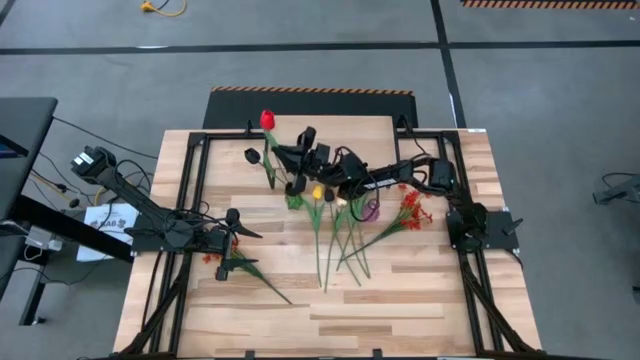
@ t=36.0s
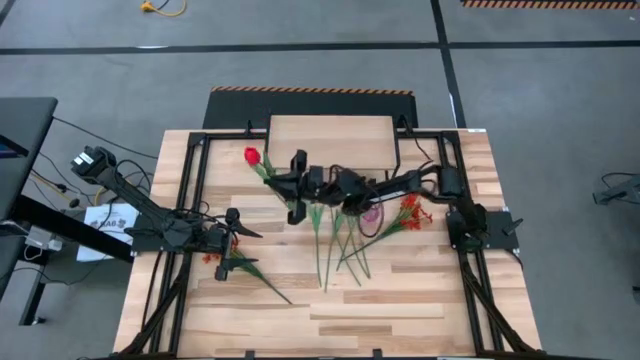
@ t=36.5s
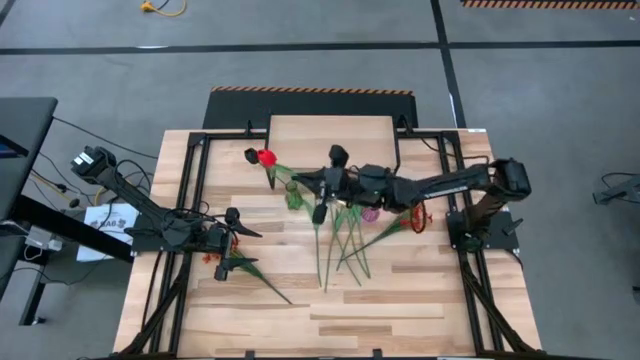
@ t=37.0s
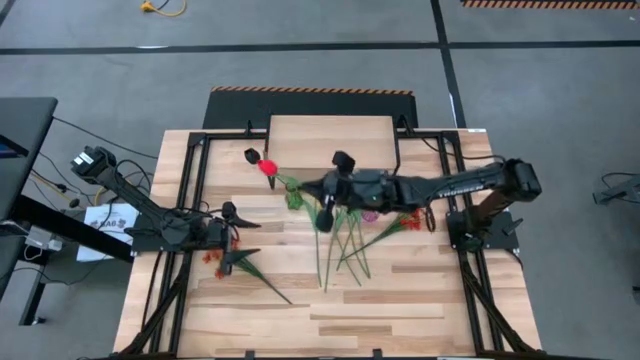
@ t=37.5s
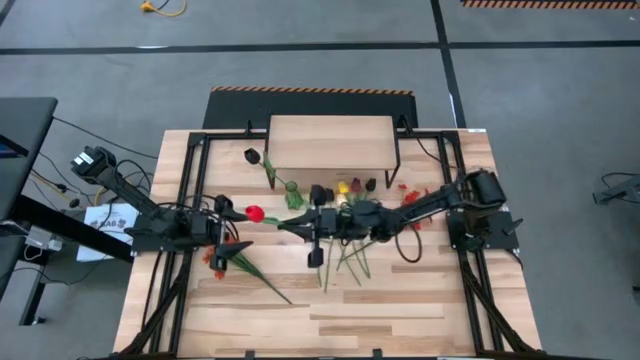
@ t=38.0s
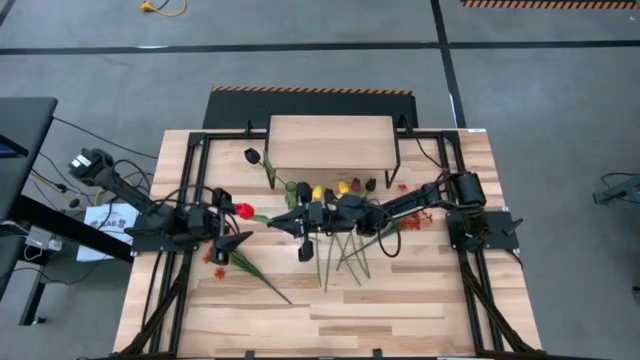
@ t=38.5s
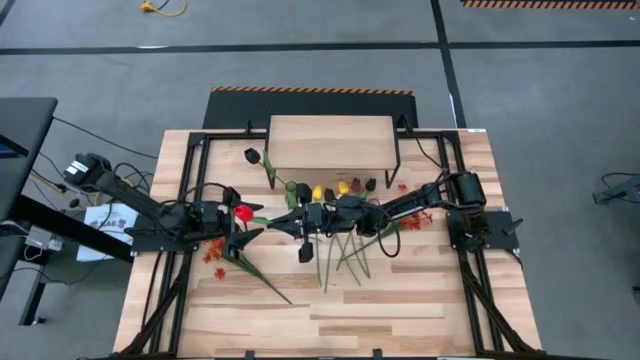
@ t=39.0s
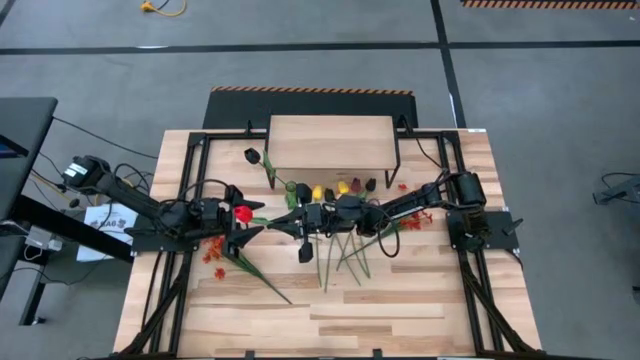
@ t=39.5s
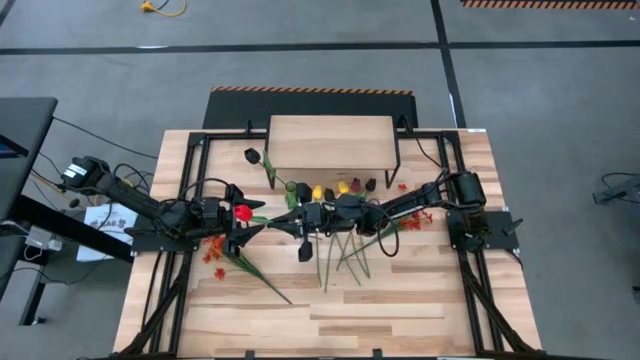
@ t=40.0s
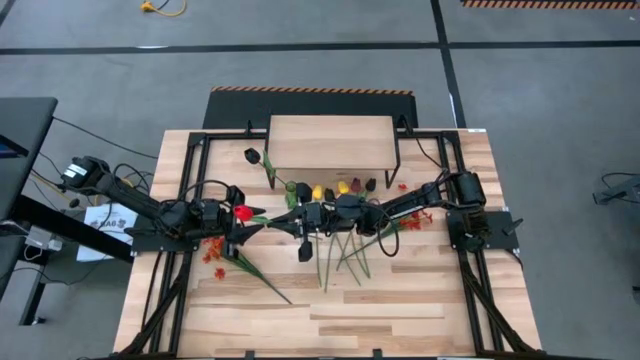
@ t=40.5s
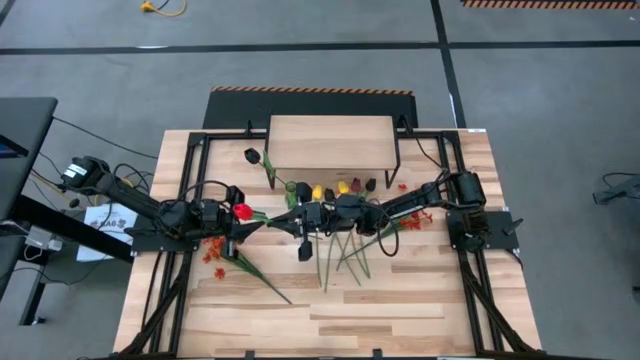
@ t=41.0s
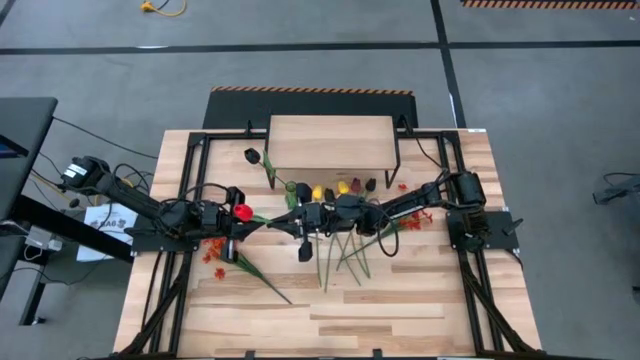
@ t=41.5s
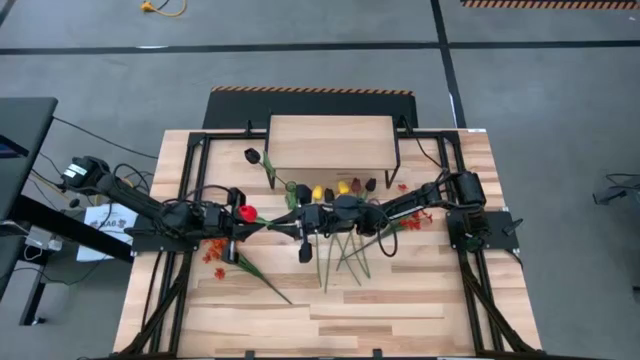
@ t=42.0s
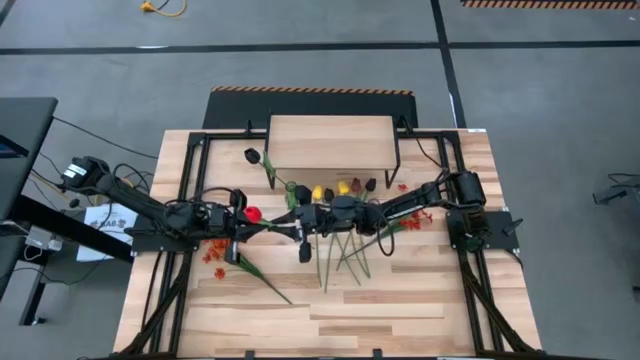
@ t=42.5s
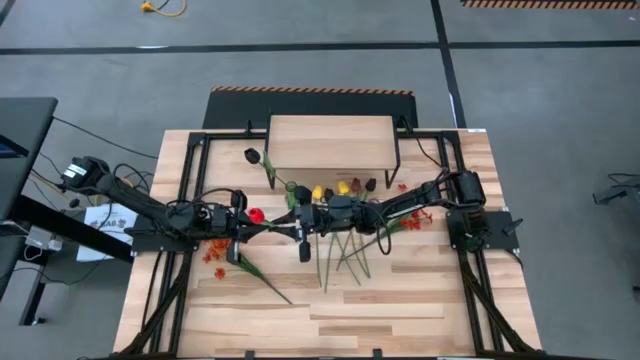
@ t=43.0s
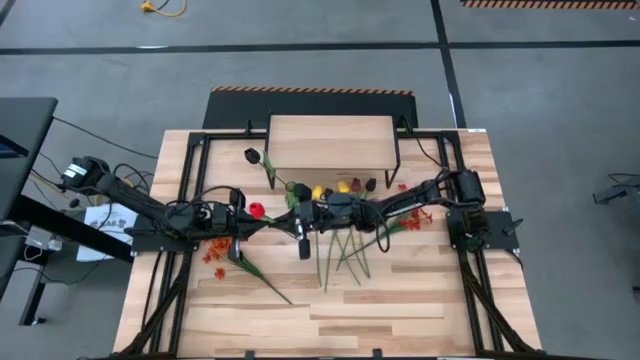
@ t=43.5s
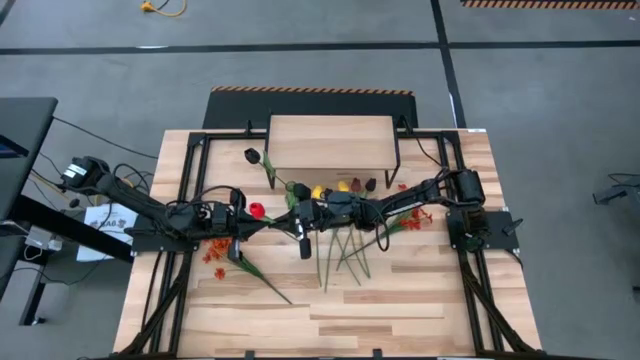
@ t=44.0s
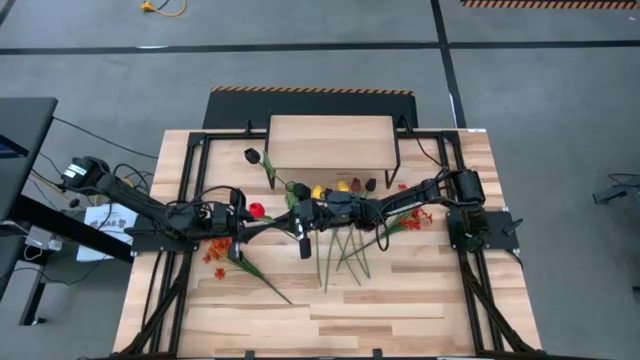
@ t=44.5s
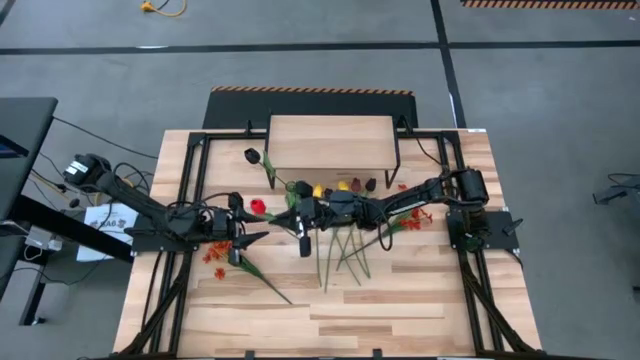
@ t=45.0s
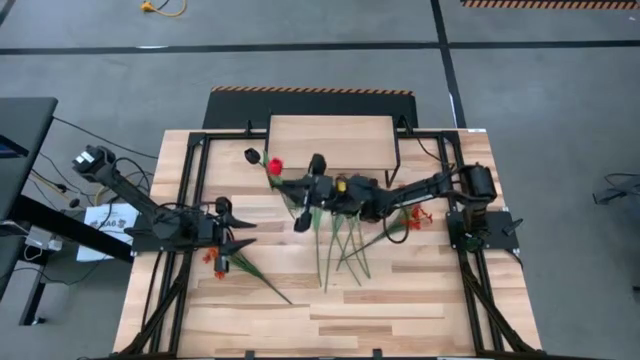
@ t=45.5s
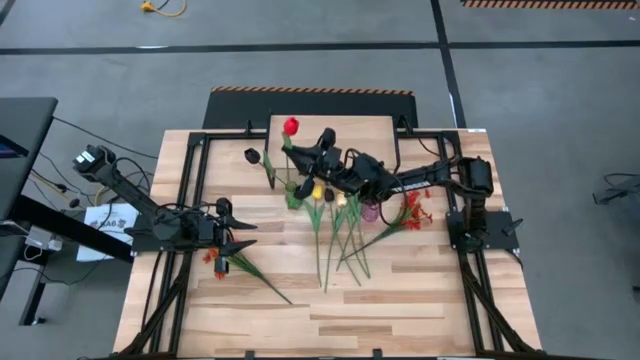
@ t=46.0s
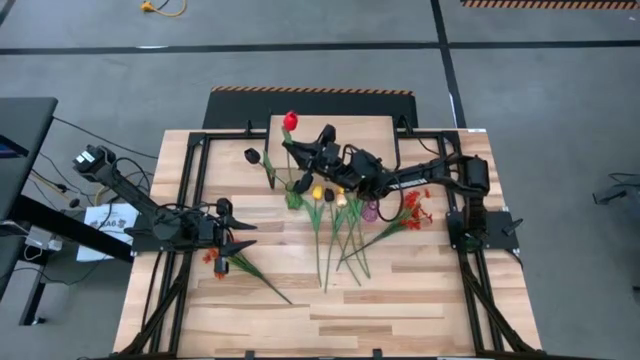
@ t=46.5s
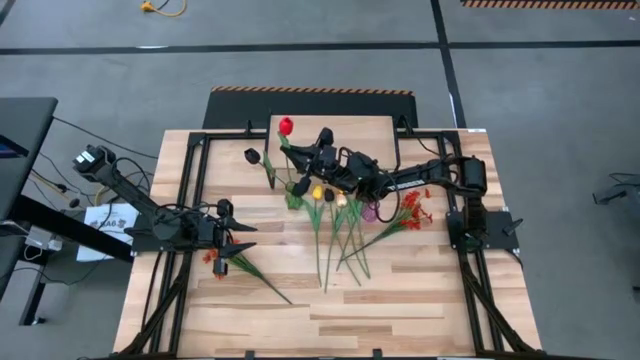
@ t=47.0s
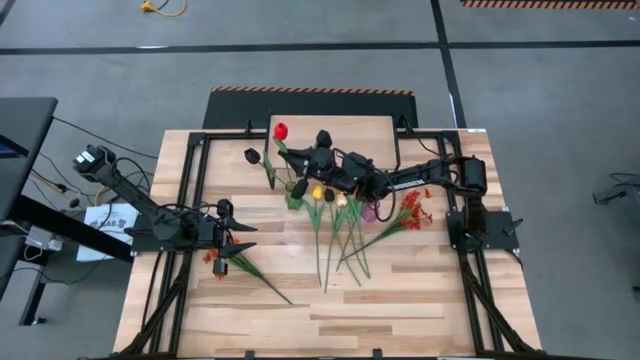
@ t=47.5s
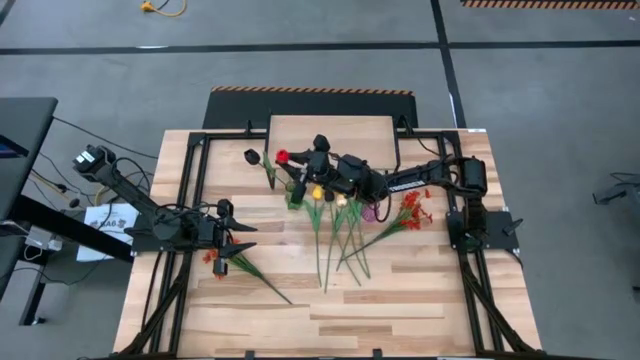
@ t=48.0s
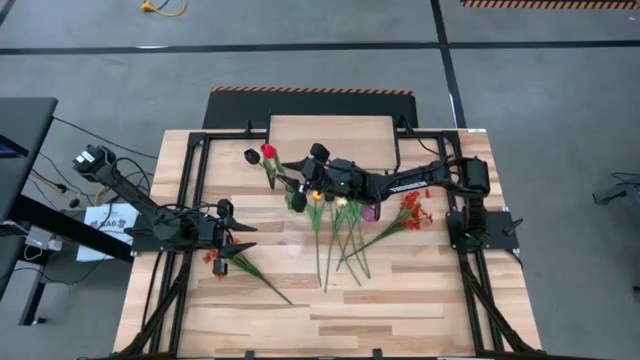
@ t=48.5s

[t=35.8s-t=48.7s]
Task: Pick and place flowers into a vace then onto a shelf
Put the red tulip into the green vase

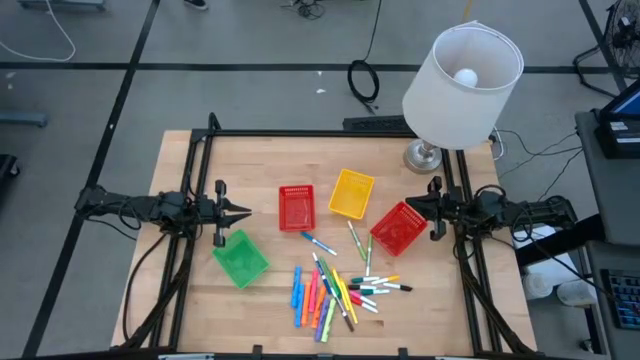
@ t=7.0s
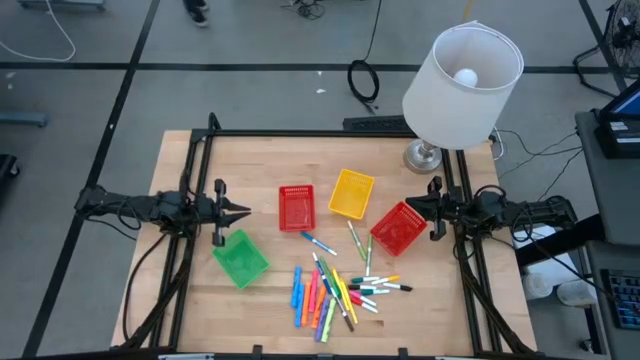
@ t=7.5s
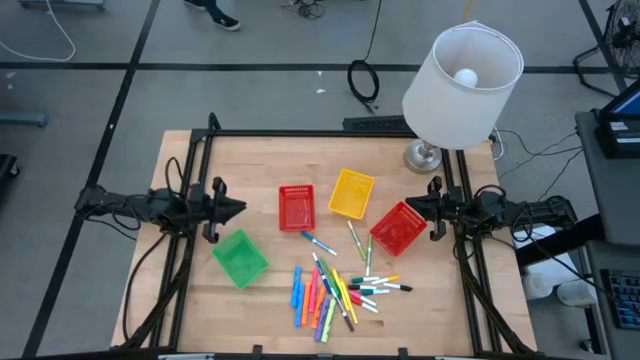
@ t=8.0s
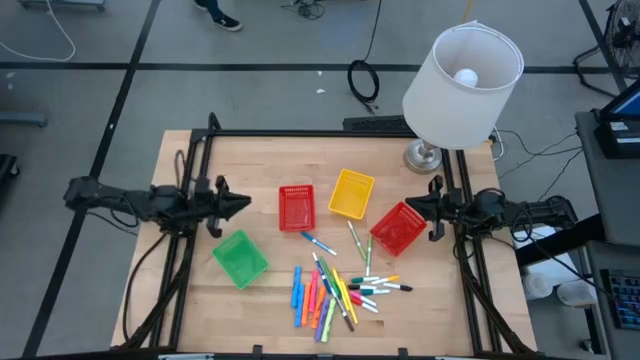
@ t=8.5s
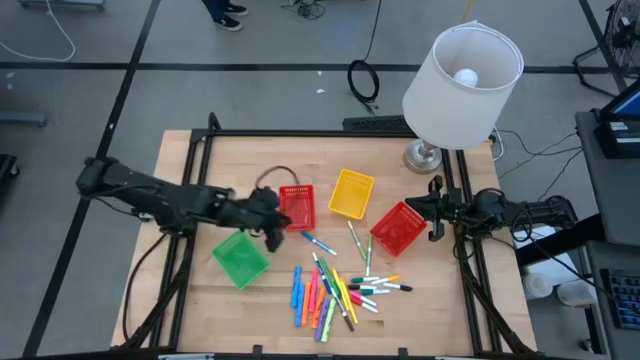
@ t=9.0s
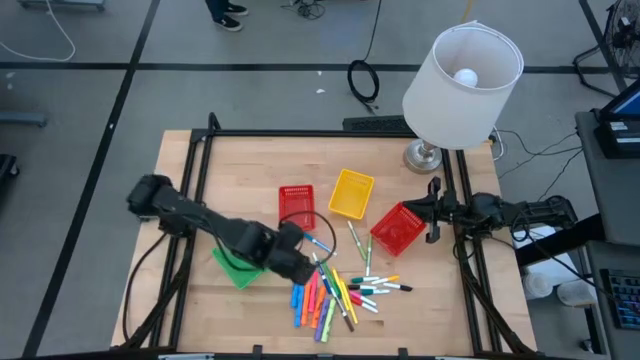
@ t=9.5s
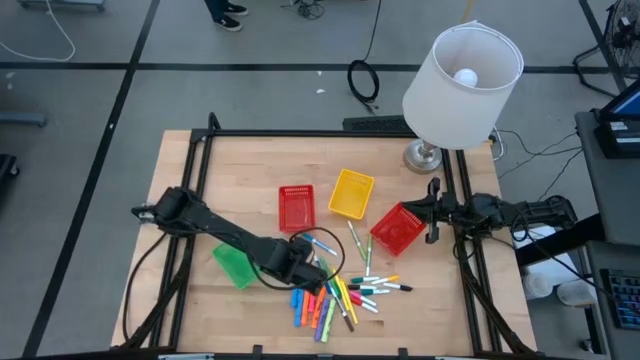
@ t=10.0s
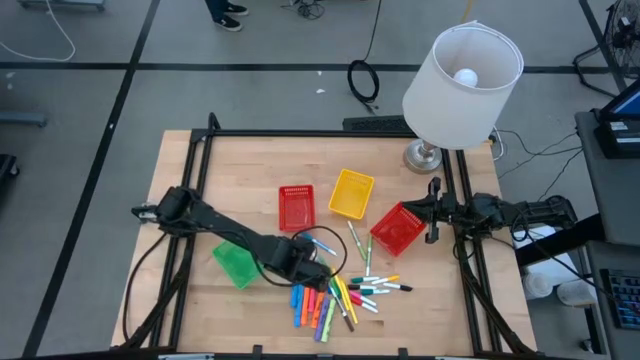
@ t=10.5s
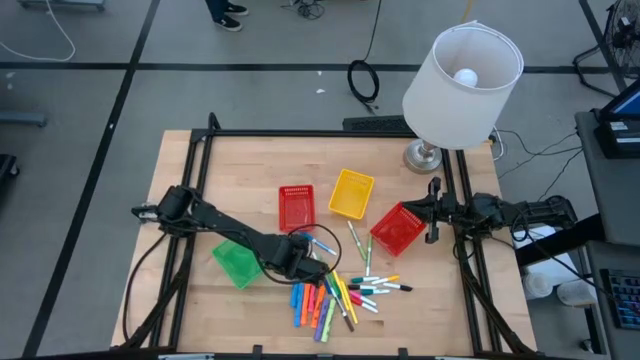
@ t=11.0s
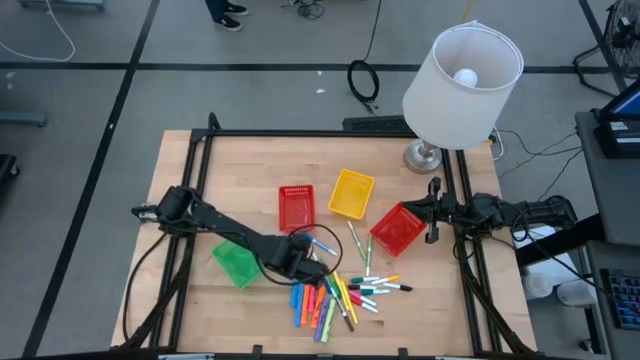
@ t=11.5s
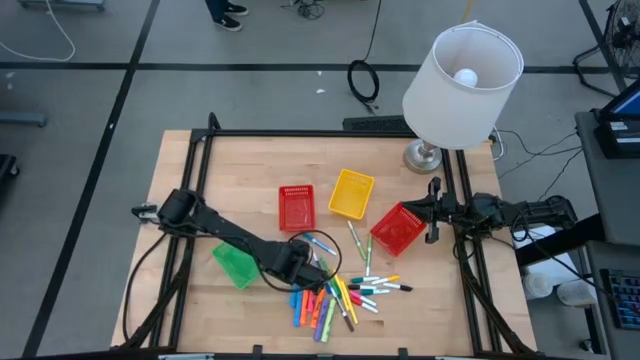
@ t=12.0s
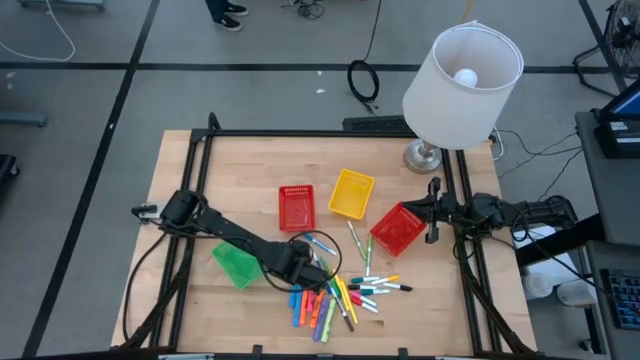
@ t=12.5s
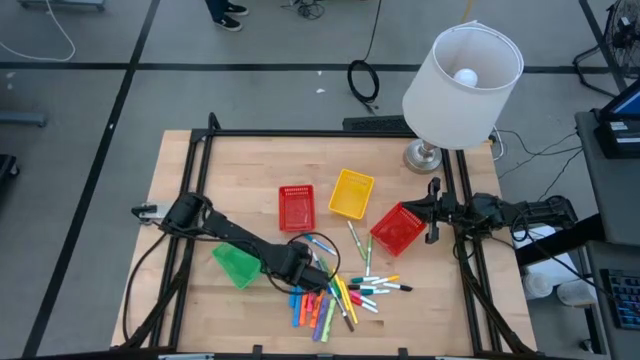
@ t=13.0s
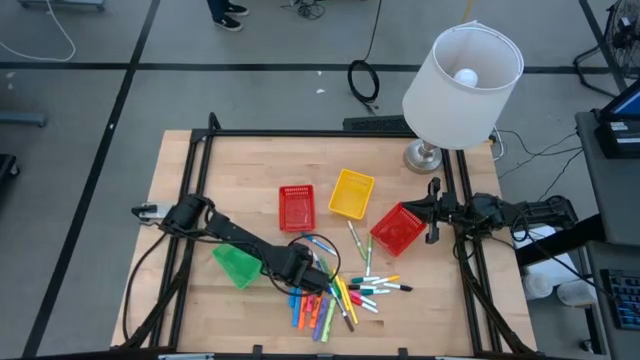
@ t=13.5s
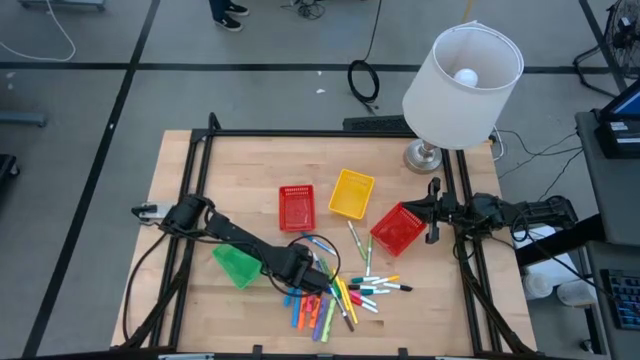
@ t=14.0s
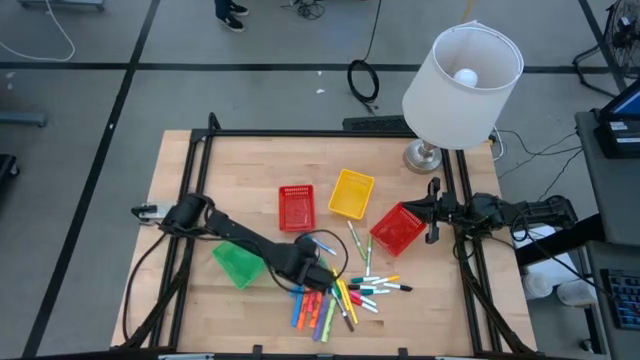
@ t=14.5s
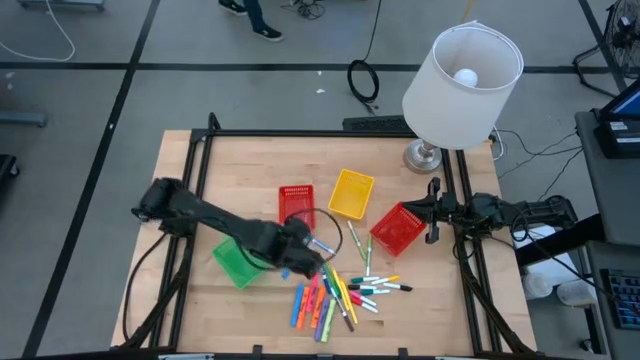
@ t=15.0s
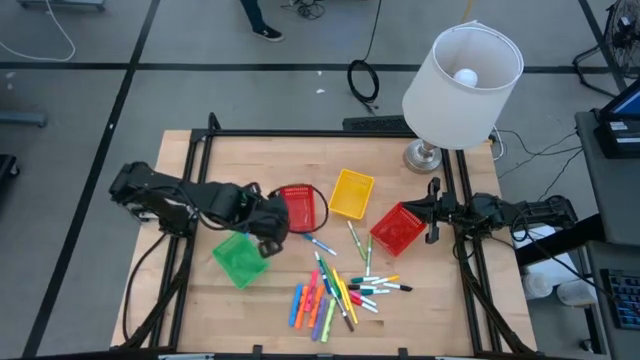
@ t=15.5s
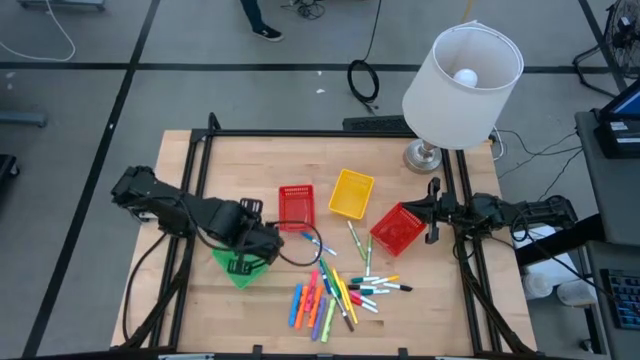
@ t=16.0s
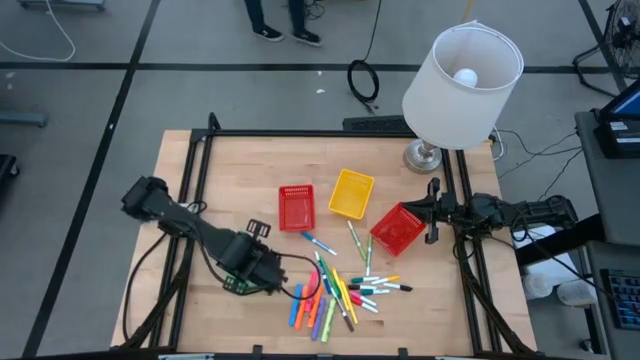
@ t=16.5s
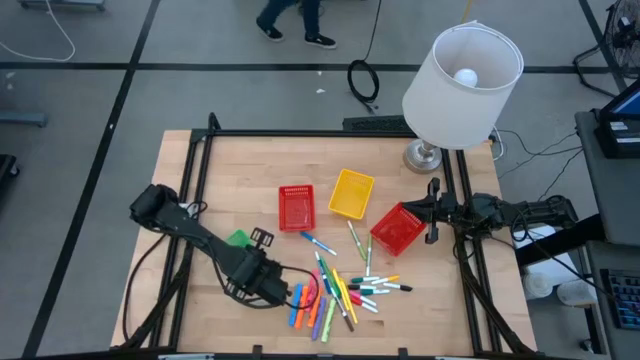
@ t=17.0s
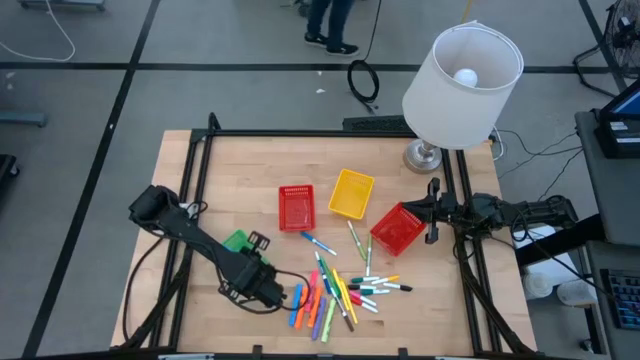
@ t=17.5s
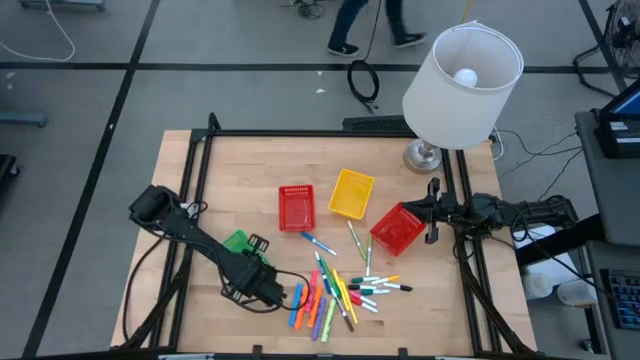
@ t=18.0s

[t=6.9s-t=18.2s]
Task: Pick & Place Markers
Put the left large blue highlighter pen into the green bin
